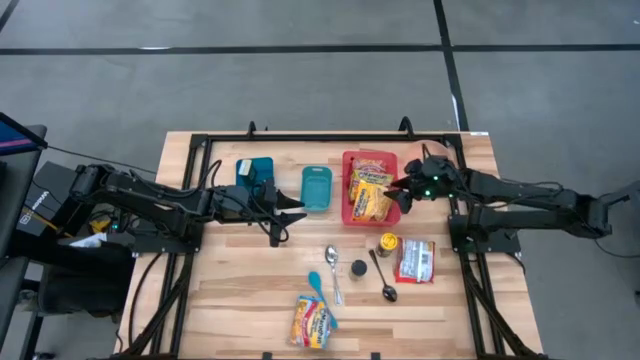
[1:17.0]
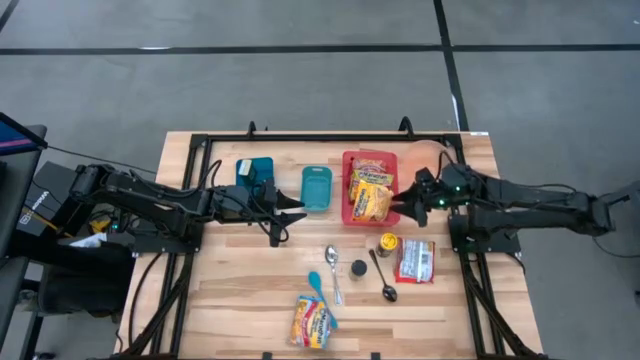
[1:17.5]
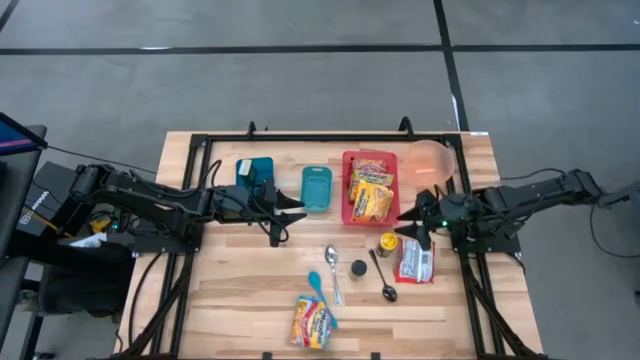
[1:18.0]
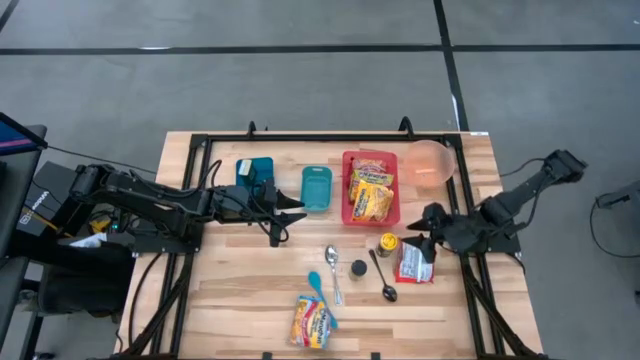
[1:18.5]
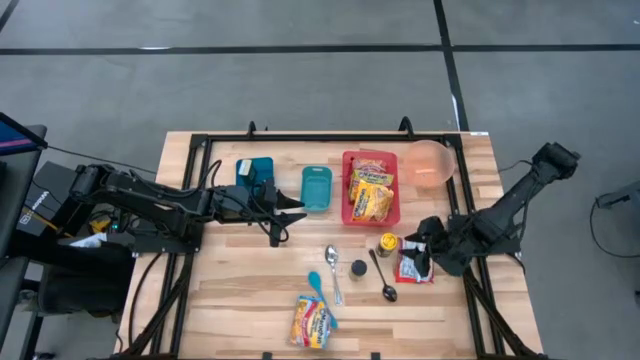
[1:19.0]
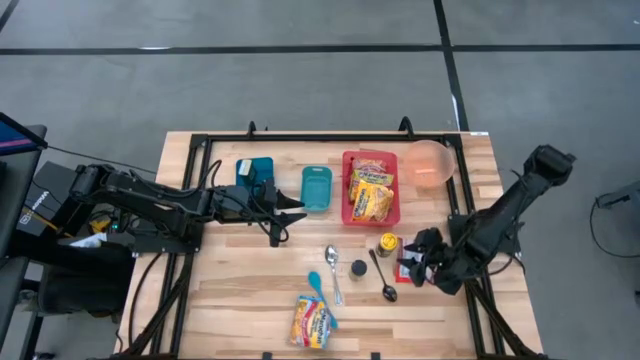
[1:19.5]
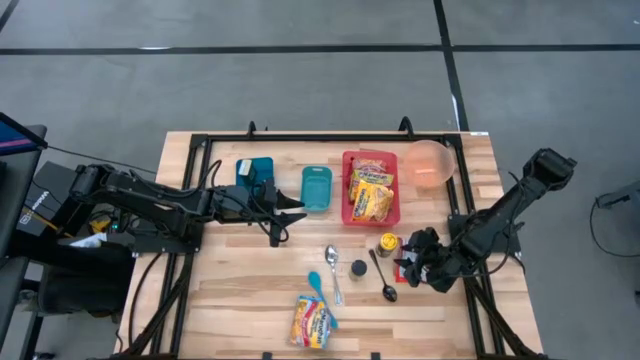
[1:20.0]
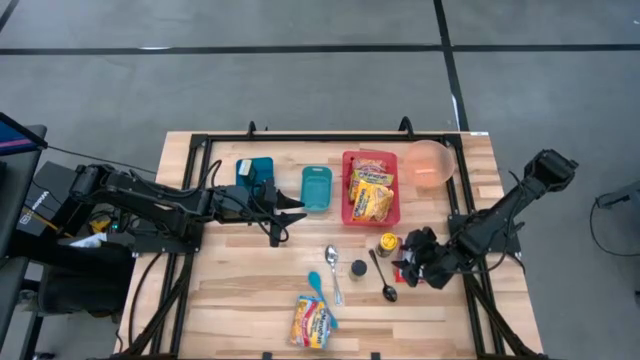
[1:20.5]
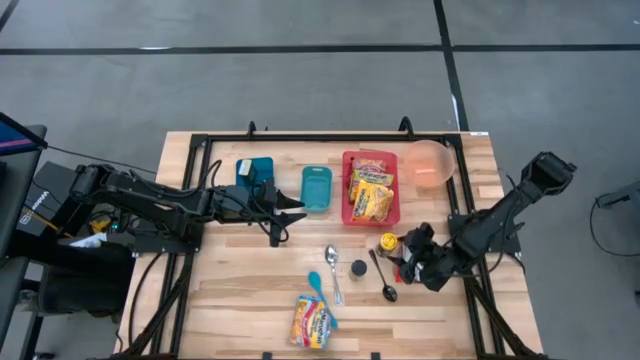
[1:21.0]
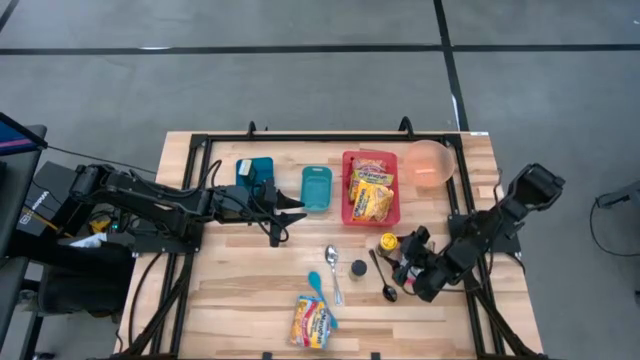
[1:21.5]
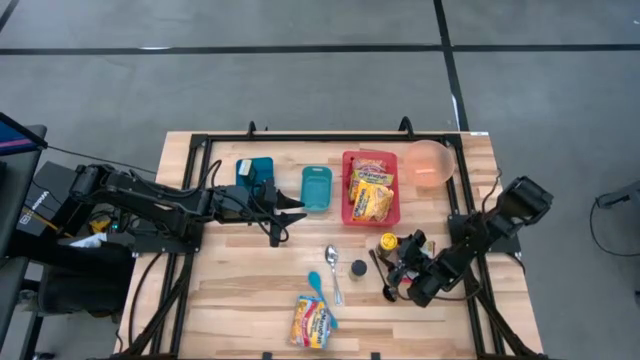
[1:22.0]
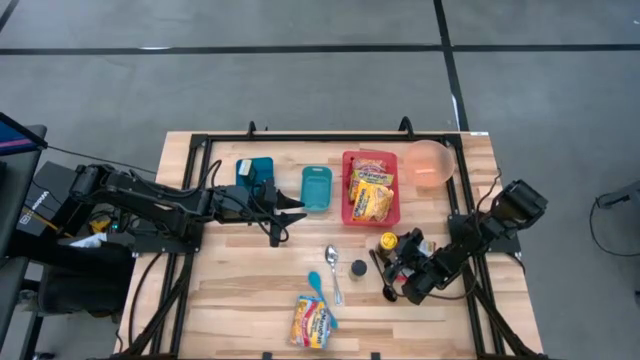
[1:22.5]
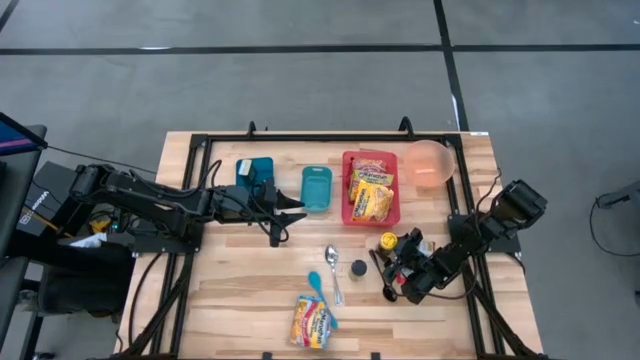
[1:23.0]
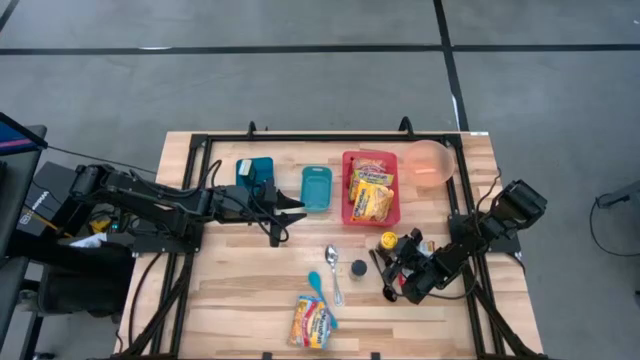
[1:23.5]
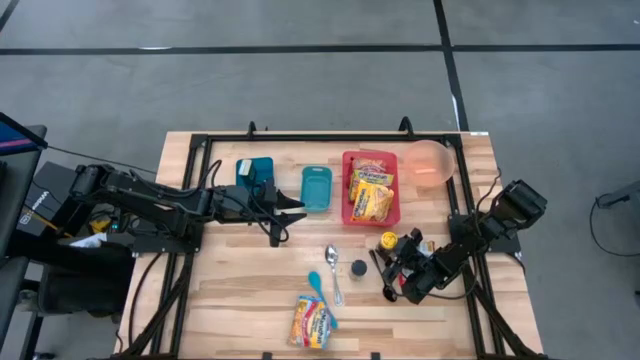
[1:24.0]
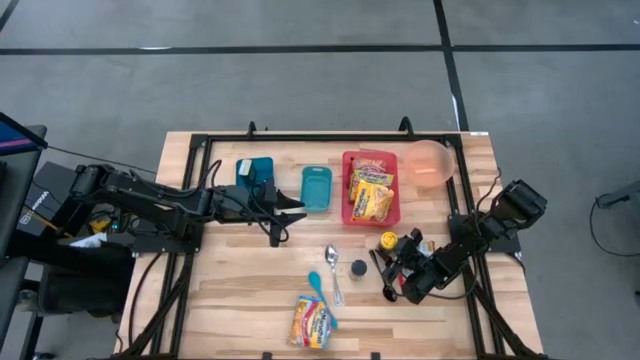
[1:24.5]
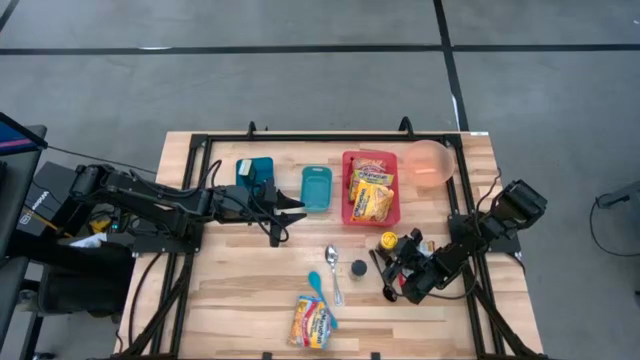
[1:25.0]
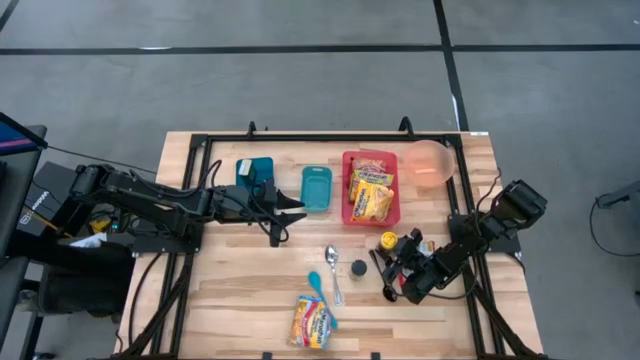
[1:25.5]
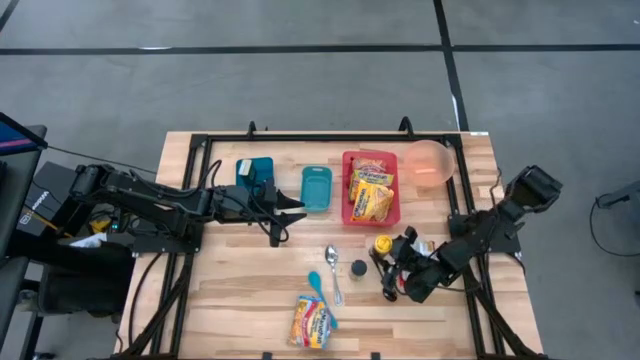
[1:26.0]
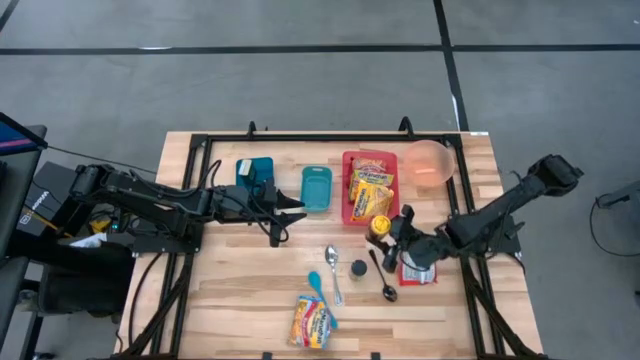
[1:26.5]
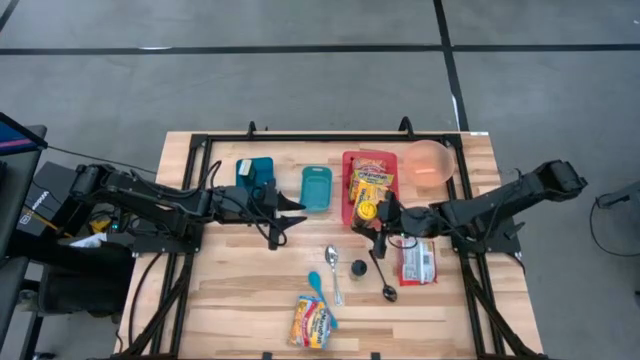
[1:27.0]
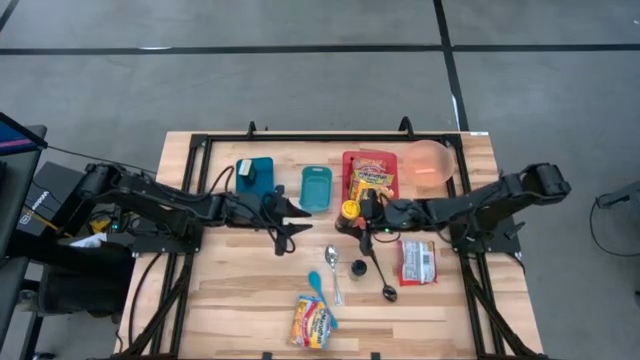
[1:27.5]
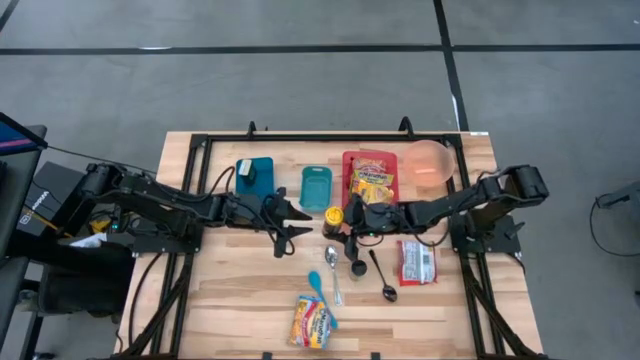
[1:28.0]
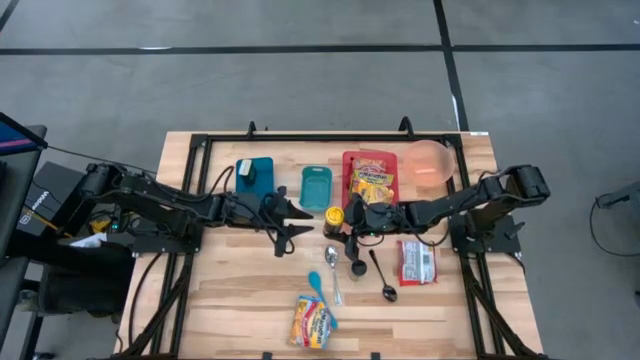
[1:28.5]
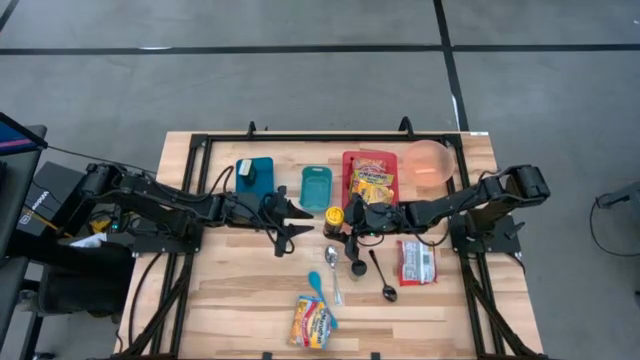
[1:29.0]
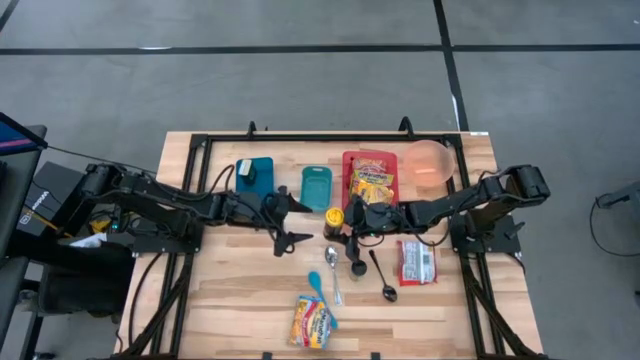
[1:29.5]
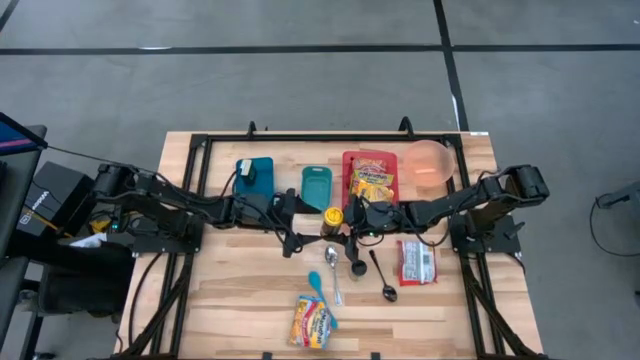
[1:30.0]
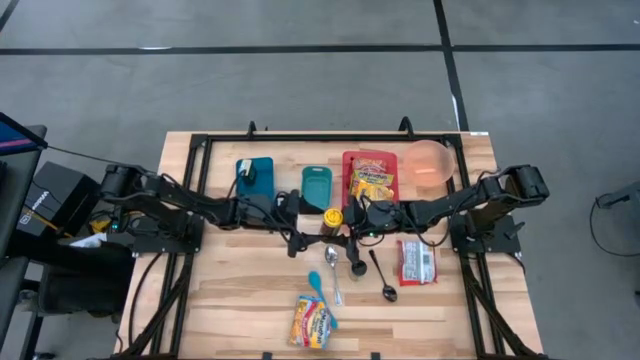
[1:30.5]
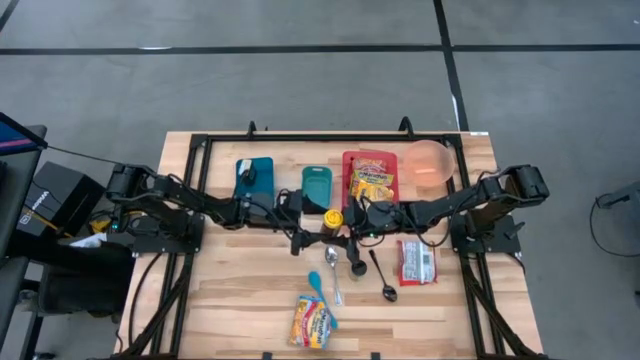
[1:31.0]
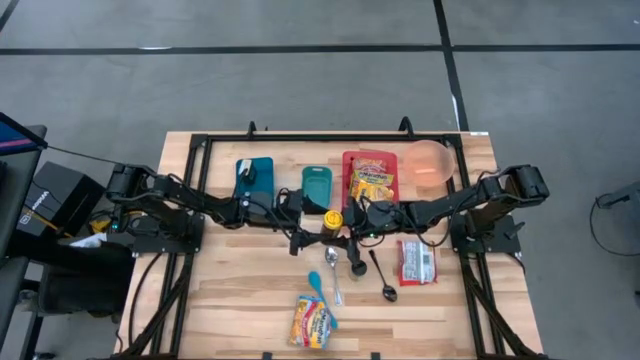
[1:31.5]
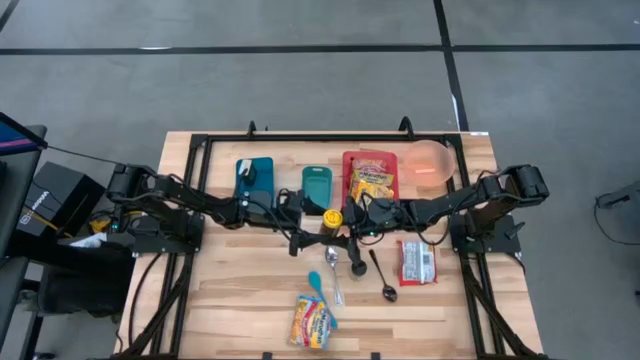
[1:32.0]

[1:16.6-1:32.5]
Task: Pick & Place Food Item
Put the yellow spice bottle into the blue bin
